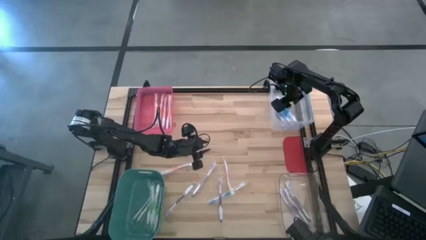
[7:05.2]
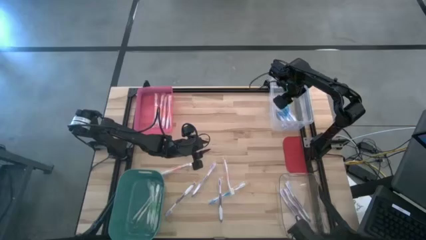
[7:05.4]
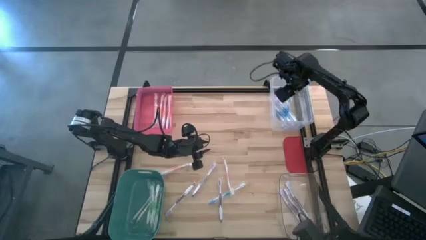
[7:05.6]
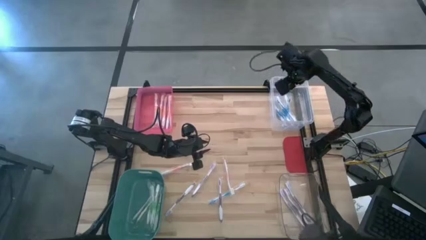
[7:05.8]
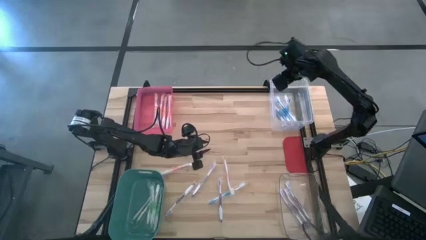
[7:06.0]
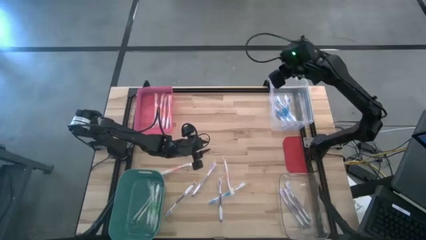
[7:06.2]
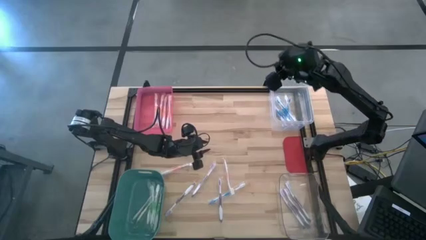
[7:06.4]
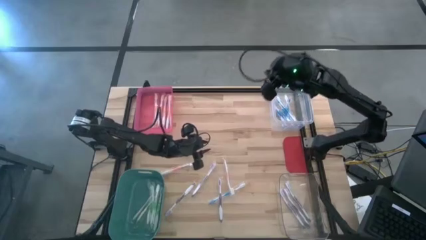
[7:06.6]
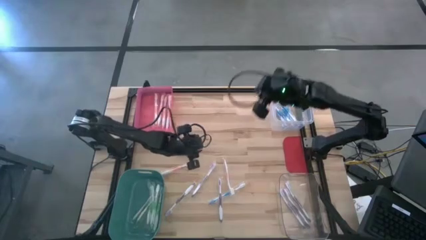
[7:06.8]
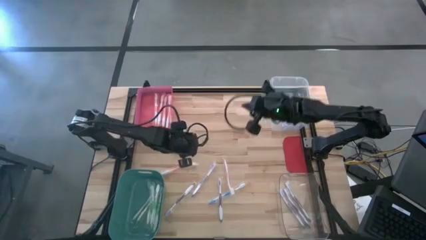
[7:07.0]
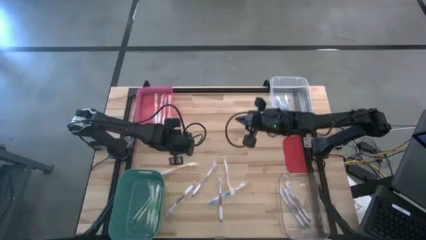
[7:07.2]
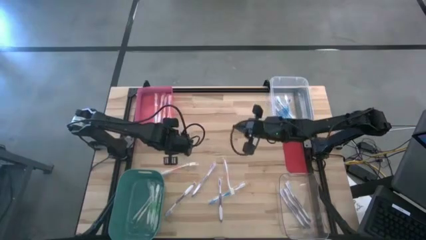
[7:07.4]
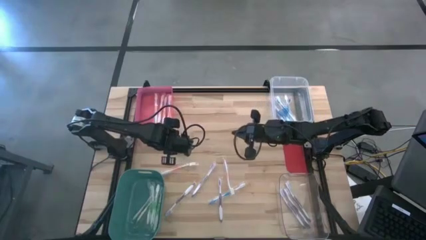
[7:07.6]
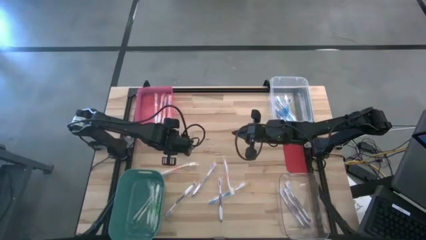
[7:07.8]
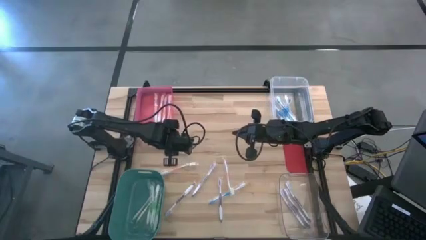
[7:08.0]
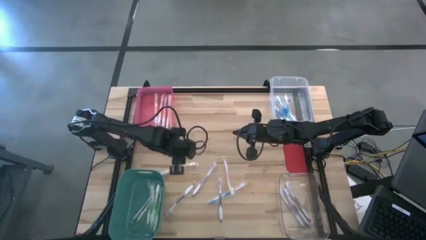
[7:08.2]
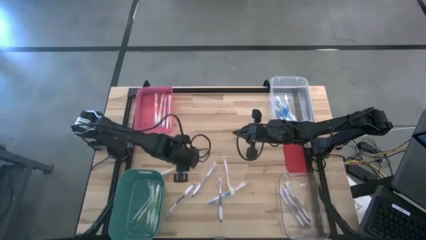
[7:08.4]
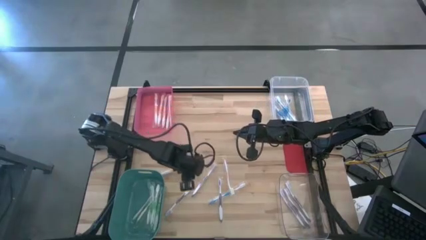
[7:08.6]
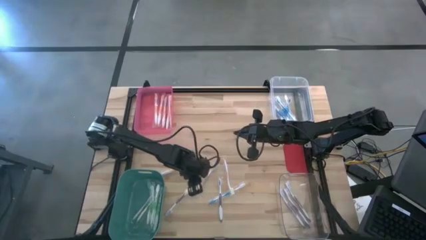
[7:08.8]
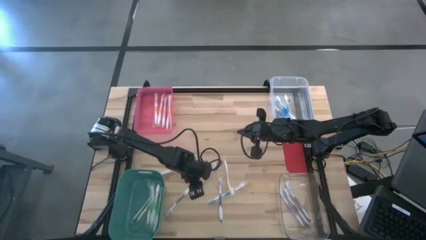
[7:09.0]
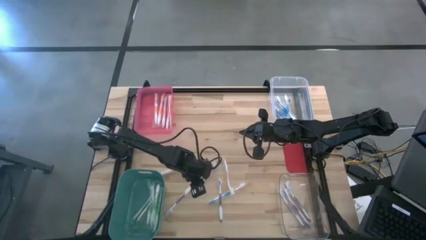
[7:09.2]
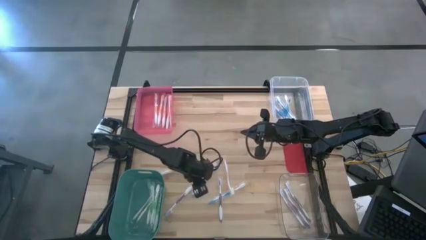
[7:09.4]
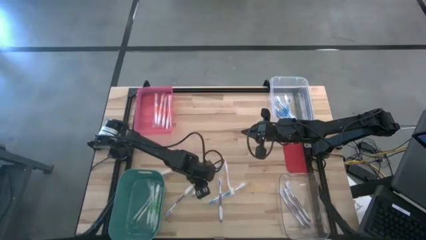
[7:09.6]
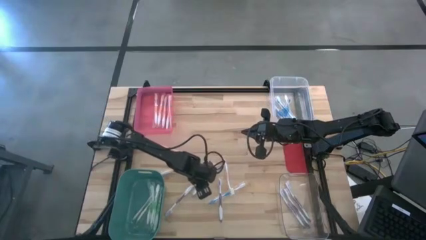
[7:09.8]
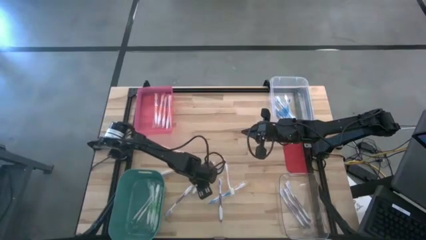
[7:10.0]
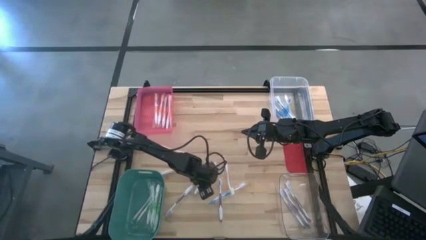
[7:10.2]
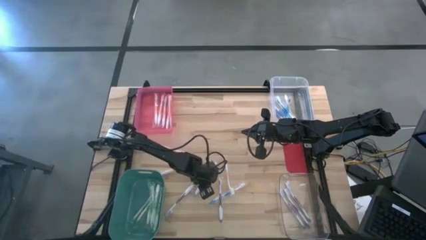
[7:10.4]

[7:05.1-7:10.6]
Task: Pick & Place Toothbrushes
Put the violet toothbrush into the bottom transparent bin

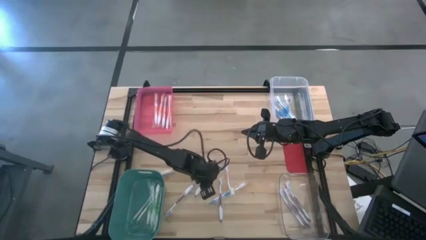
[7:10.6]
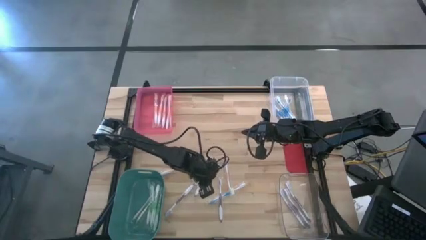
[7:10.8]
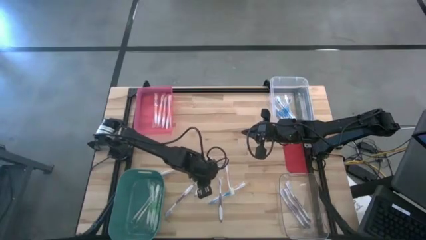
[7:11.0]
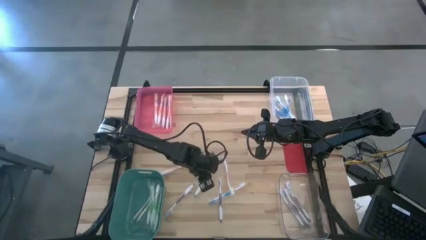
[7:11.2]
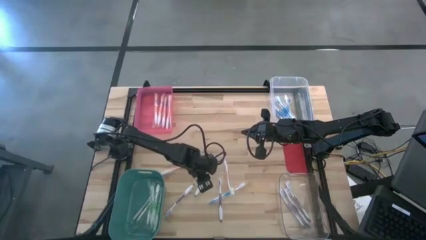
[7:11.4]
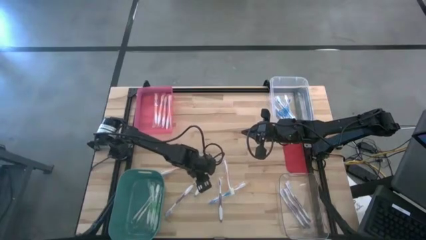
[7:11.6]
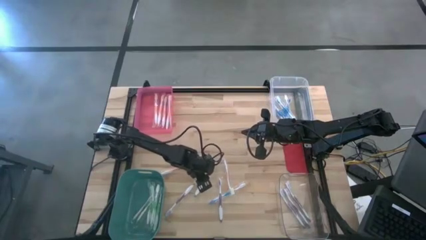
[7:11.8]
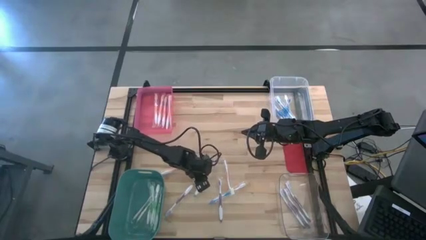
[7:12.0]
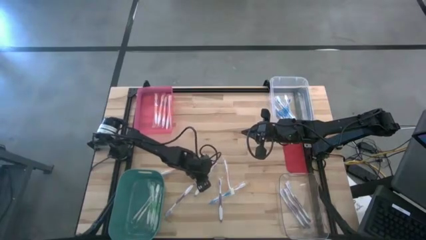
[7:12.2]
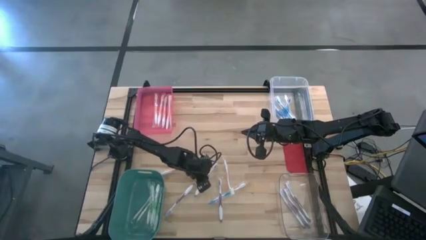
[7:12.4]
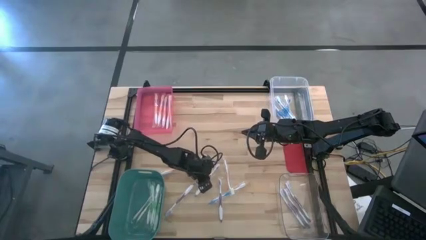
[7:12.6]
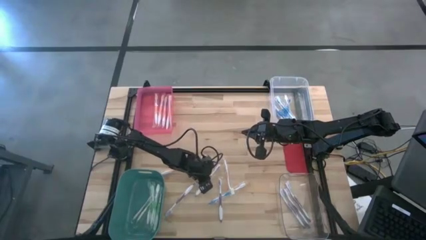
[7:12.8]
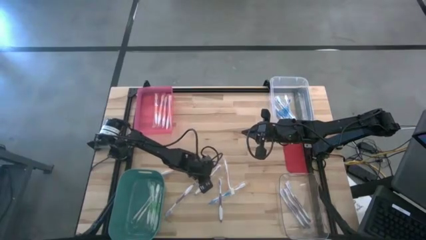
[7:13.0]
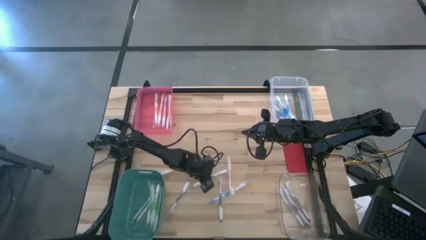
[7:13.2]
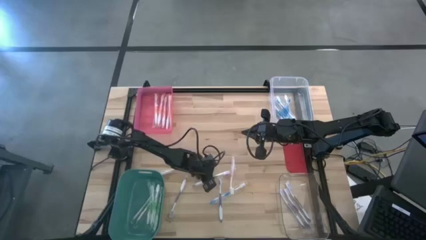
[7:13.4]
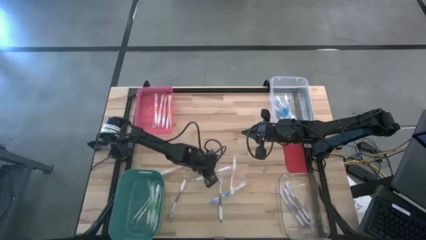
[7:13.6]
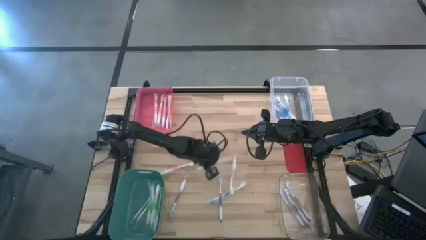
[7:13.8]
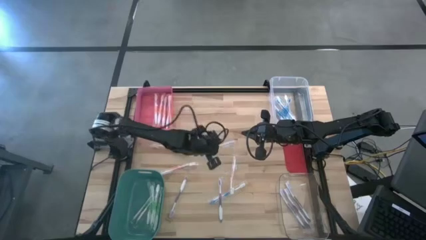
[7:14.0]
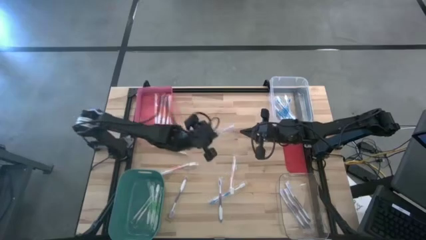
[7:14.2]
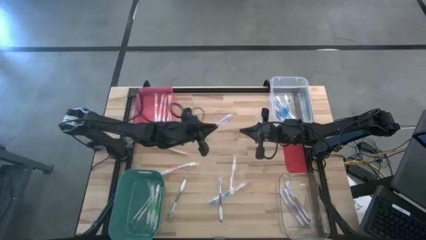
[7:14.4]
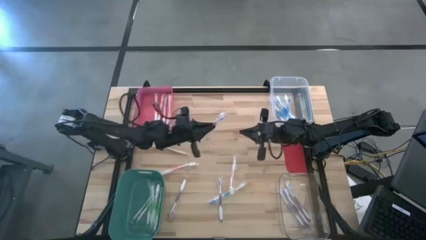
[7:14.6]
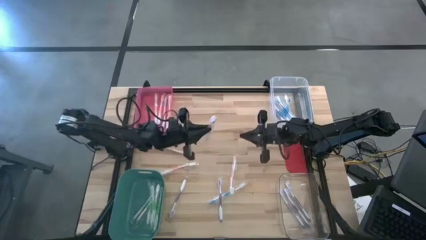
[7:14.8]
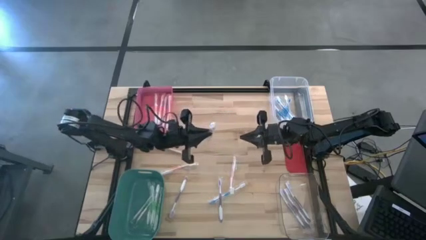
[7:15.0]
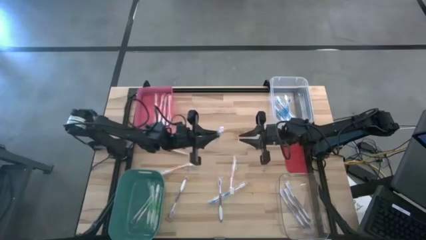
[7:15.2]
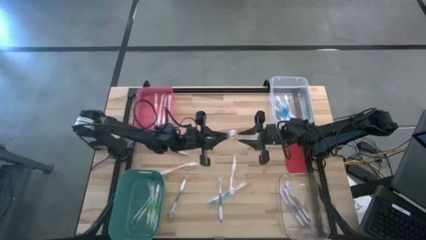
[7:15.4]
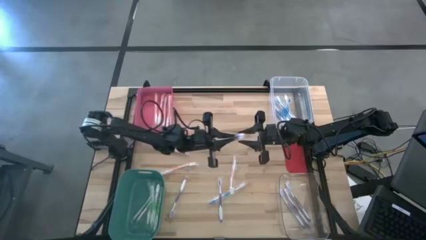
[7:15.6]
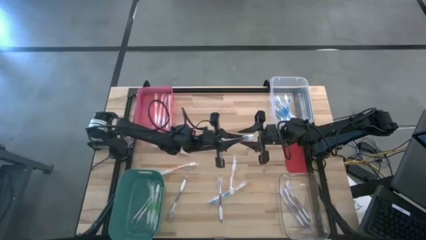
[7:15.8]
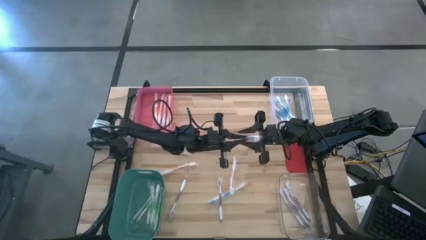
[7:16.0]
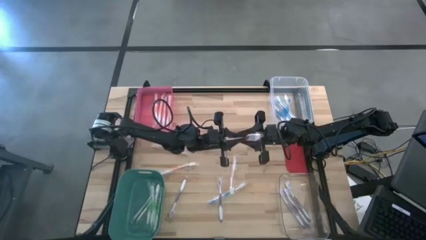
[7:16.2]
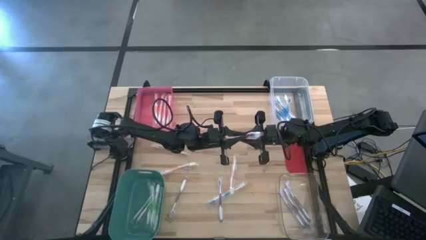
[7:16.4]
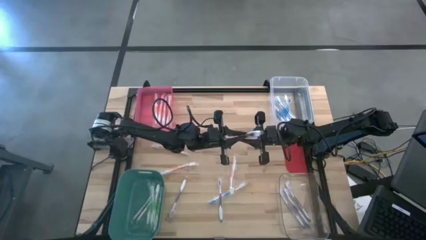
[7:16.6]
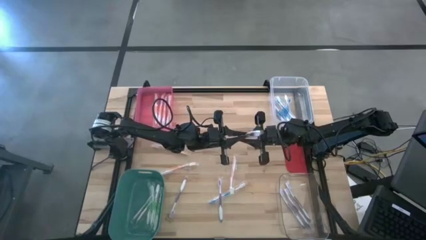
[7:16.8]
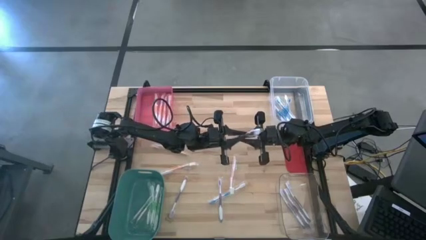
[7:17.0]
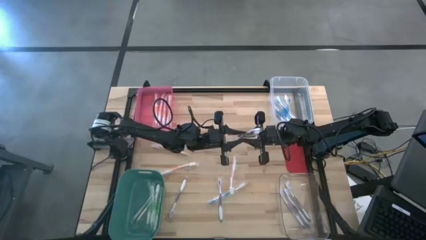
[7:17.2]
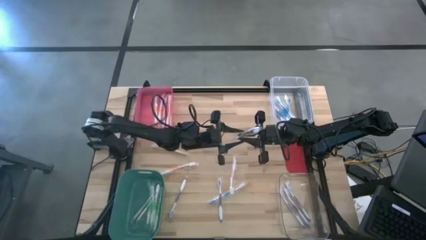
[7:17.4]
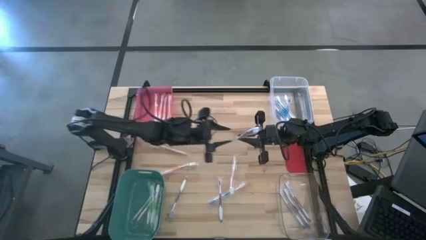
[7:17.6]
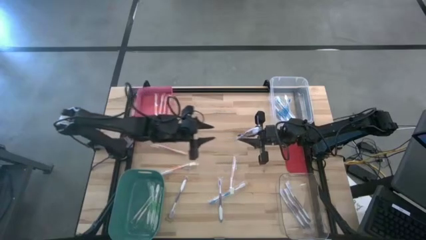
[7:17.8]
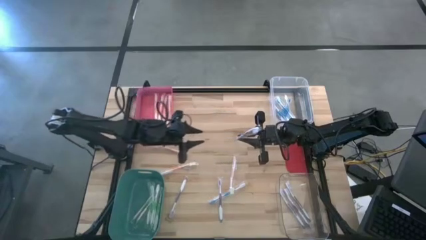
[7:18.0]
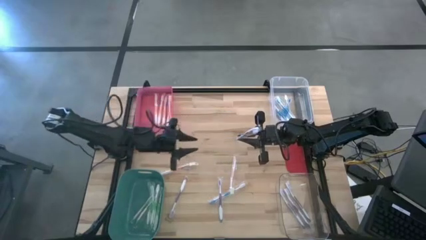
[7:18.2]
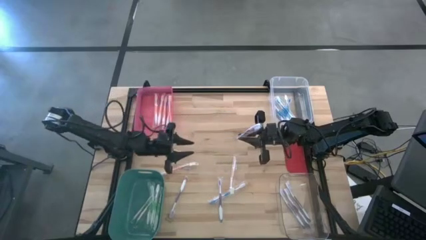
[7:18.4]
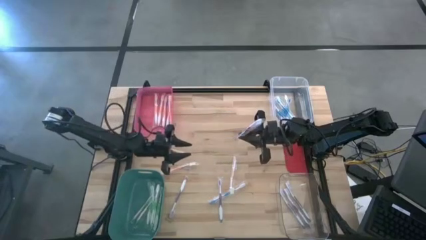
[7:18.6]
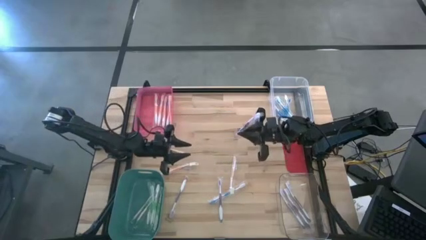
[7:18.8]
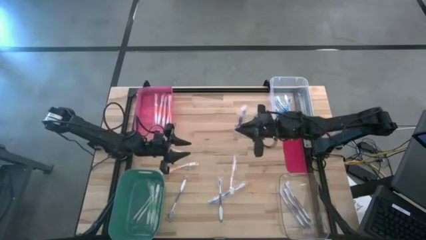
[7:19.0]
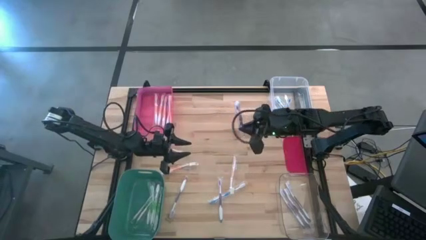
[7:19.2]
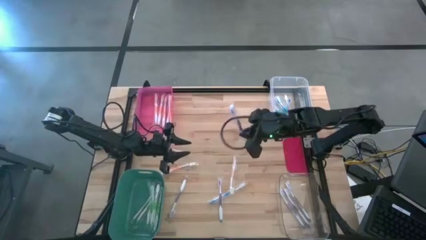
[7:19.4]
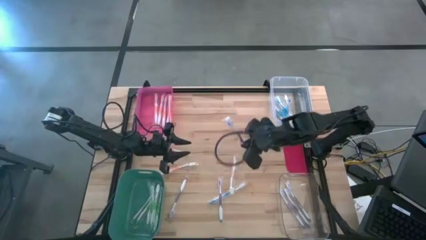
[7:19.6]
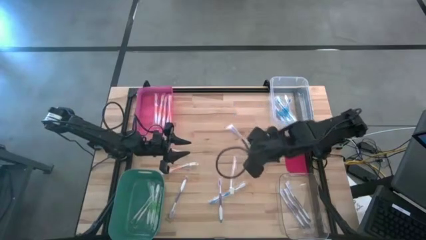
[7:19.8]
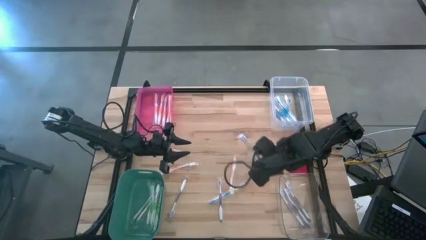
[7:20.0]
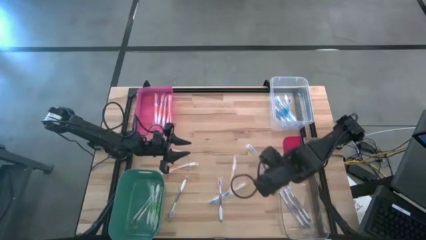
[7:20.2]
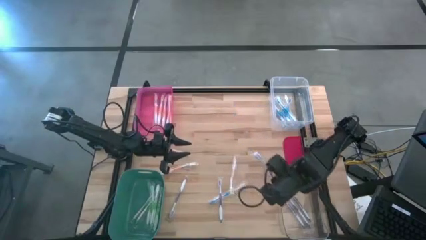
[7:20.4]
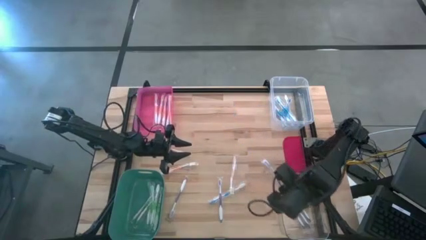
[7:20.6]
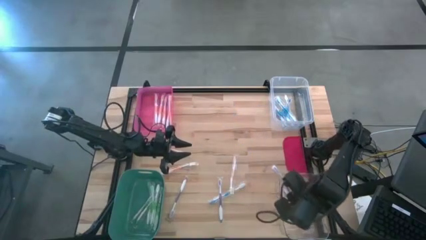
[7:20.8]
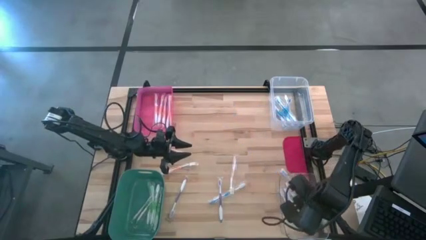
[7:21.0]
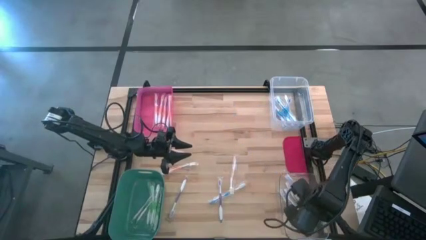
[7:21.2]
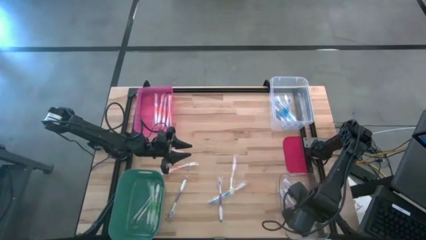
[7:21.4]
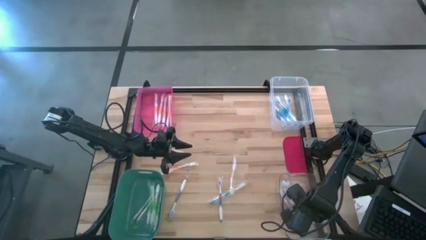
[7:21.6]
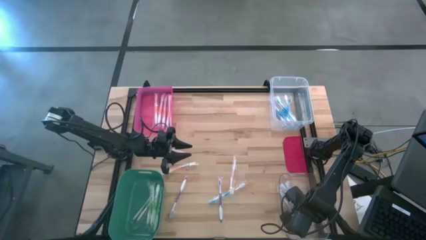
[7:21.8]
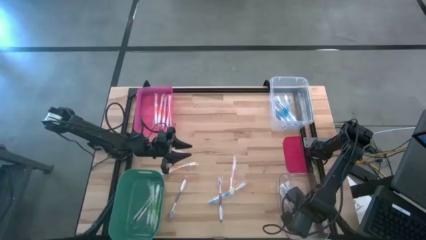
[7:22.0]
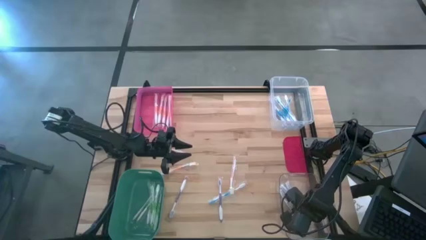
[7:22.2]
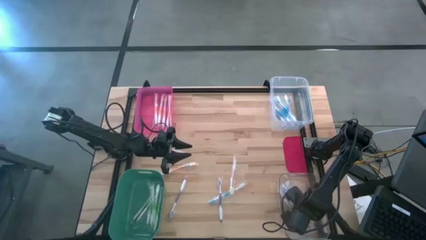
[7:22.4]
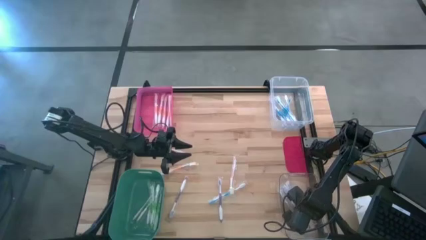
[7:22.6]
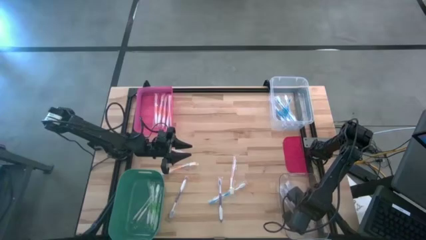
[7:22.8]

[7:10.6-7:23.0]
Put the violet toothbrush into the bottom transparent bin
